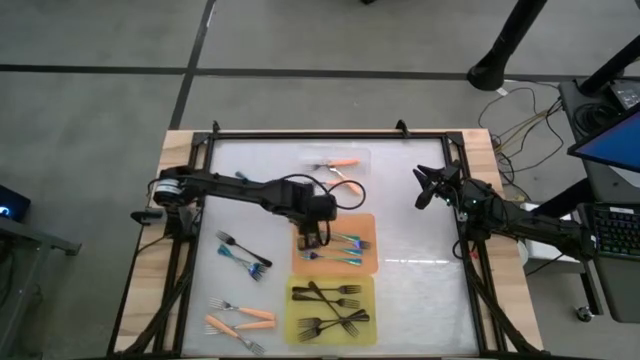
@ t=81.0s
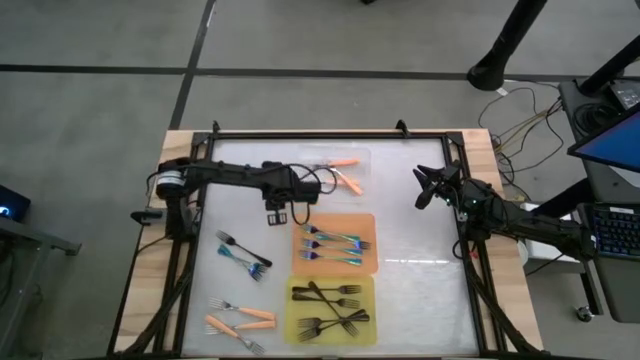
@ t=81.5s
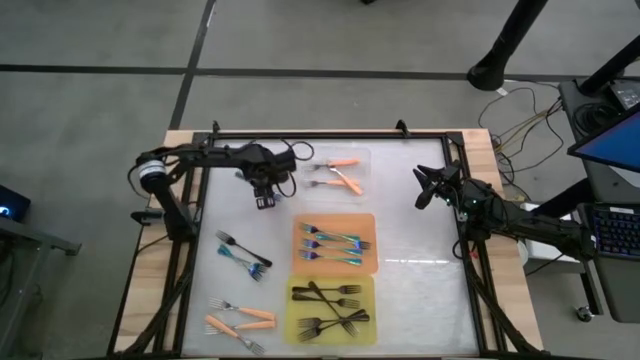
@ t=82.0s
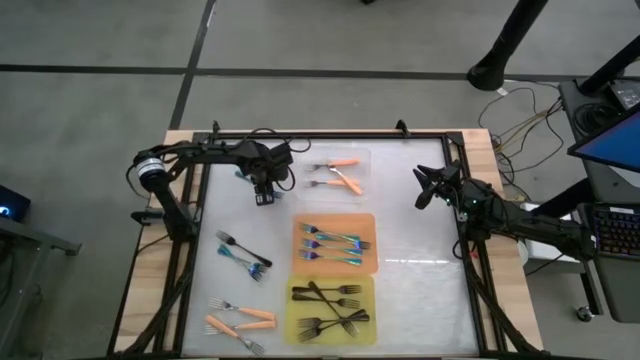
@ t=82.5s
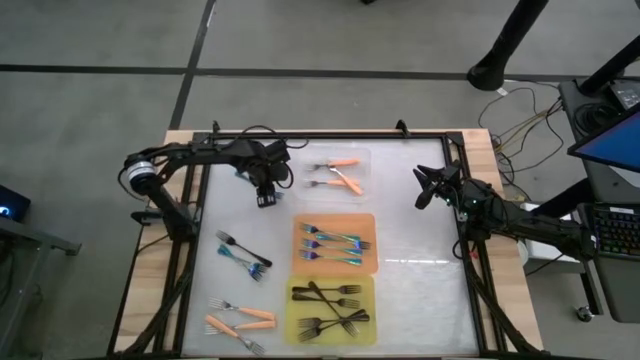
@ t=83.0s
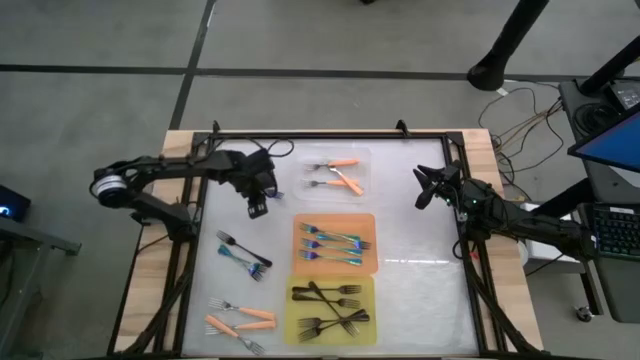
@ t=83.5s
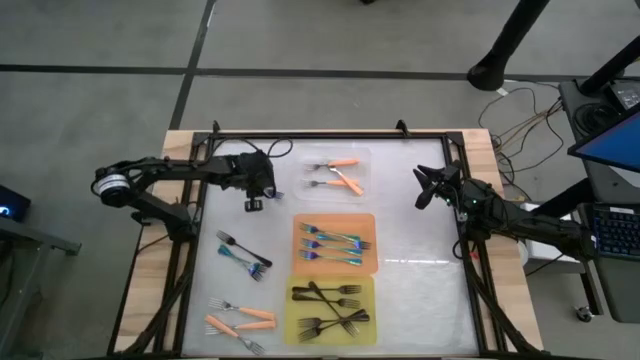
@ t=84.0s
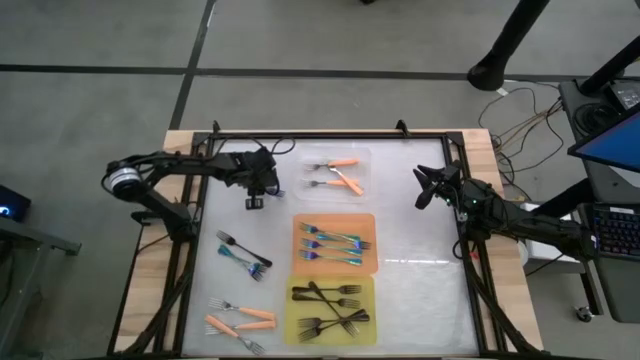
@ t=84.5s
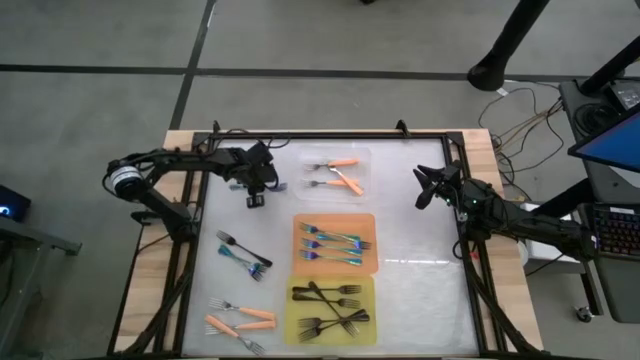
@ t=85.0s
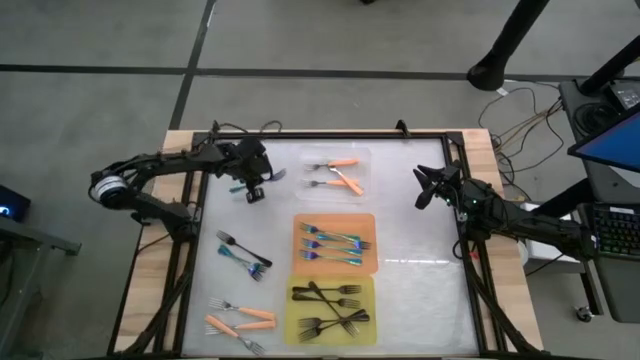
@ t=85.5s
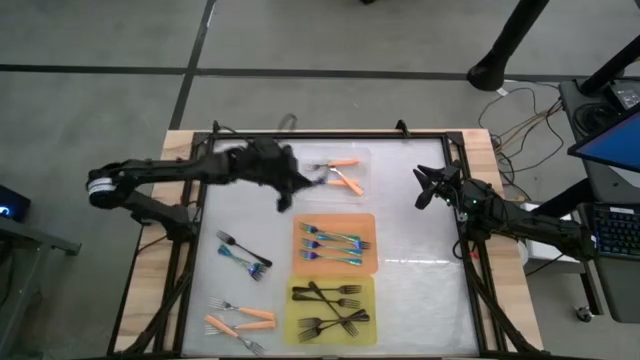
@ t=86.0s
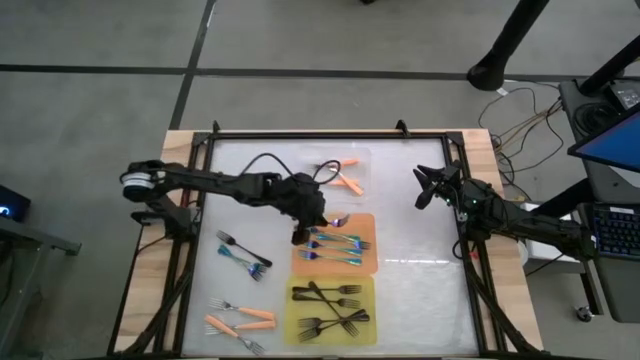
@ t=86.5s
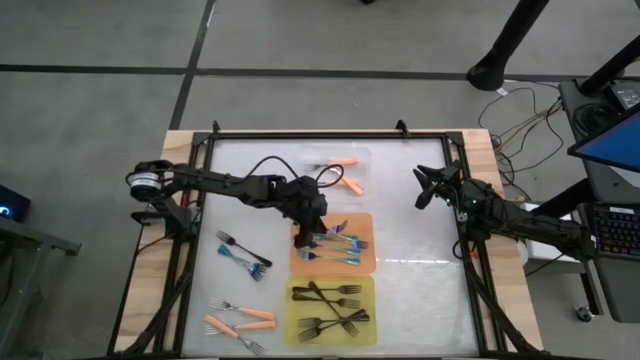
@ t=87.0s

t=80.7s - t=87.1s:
Task: Sort silverware by color (type)
Put the blue fork into the orange bin

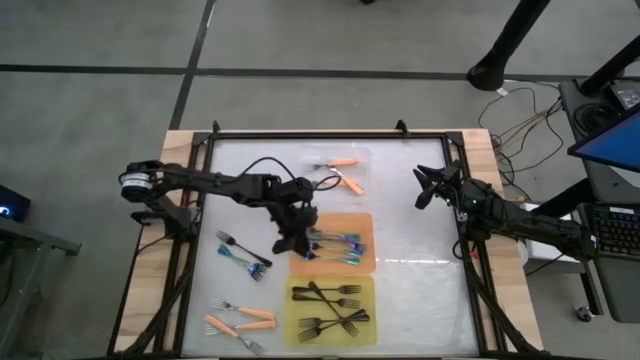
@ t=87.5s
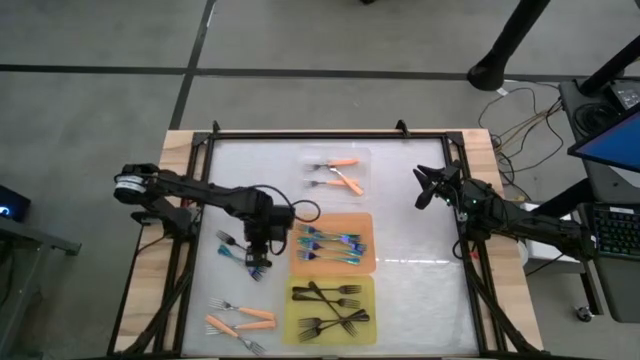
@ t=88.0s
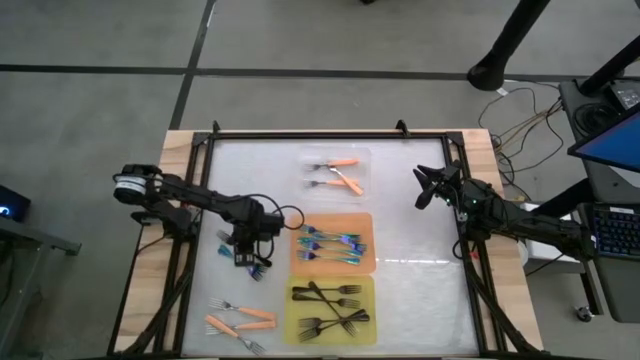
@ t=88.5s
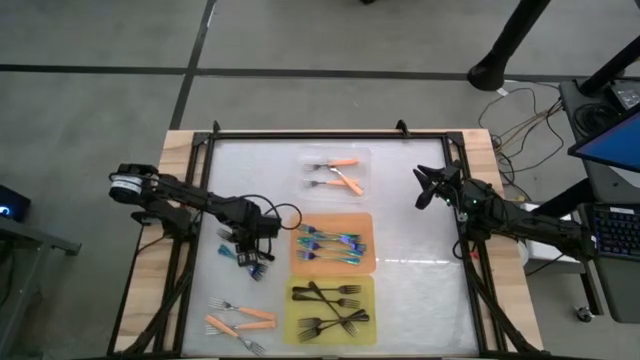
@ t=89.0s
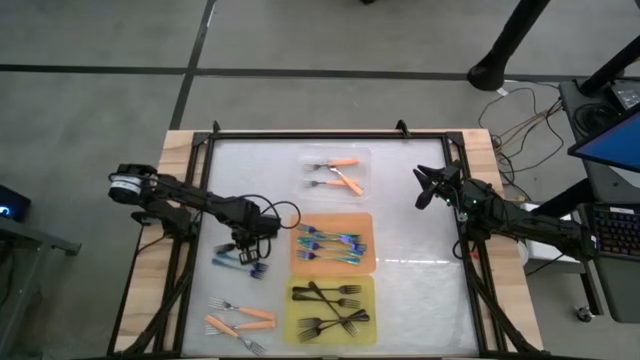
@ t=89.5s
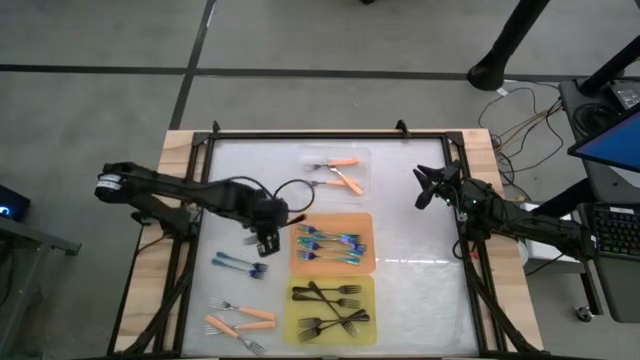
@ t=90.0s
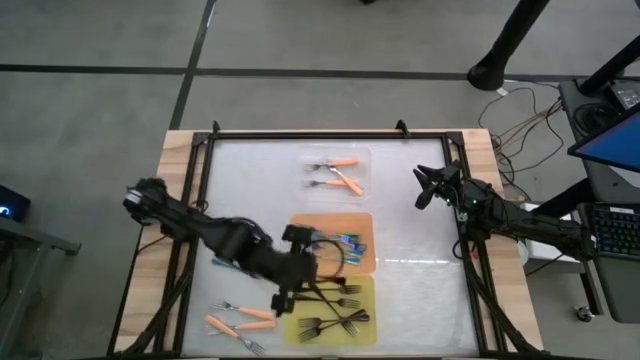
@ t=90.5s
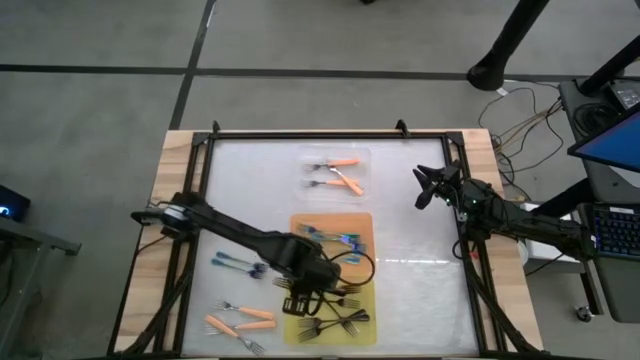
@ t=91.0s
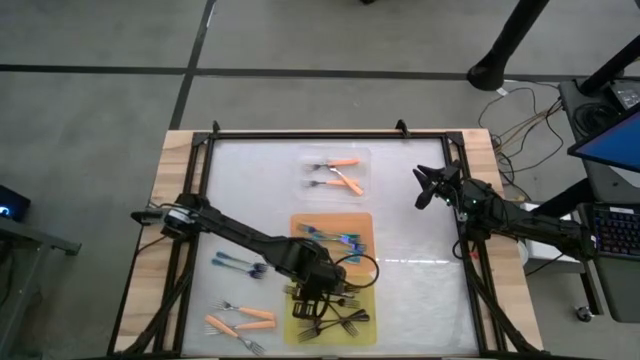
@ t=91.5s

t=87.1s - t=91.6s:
Put the black fork into the yellow bin

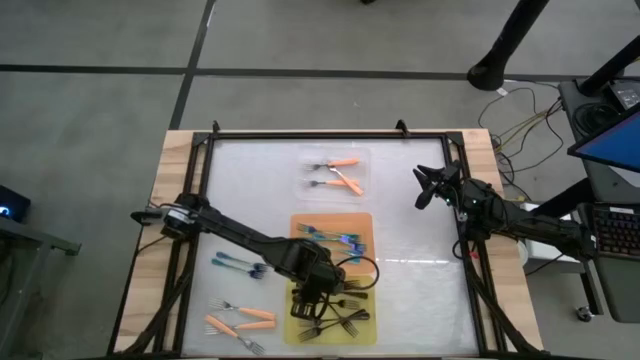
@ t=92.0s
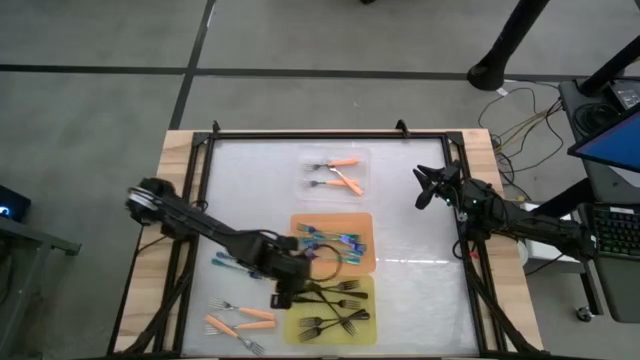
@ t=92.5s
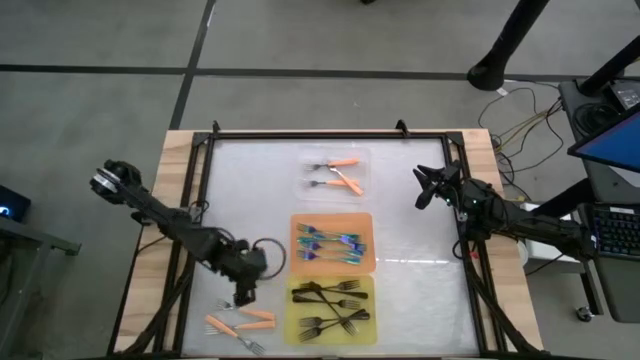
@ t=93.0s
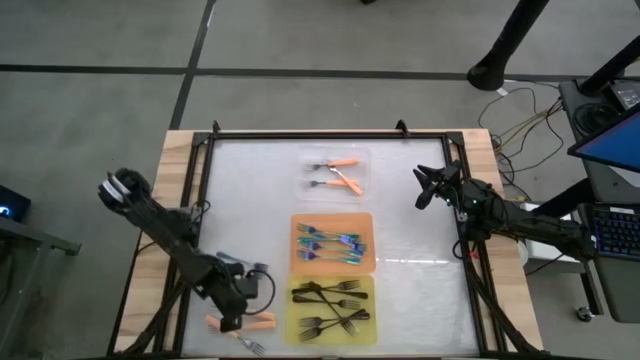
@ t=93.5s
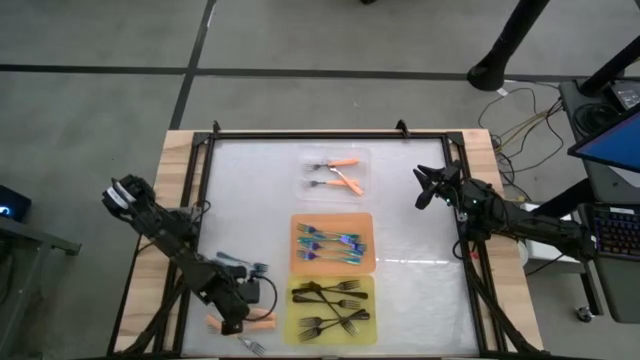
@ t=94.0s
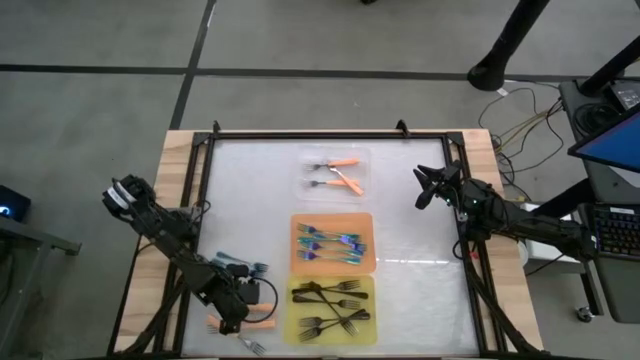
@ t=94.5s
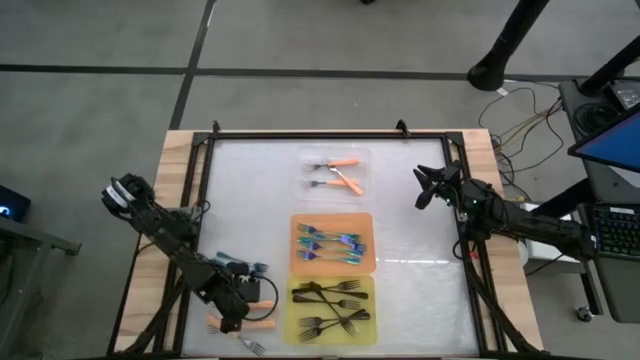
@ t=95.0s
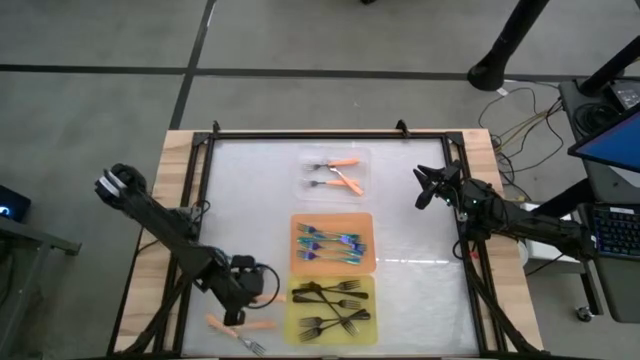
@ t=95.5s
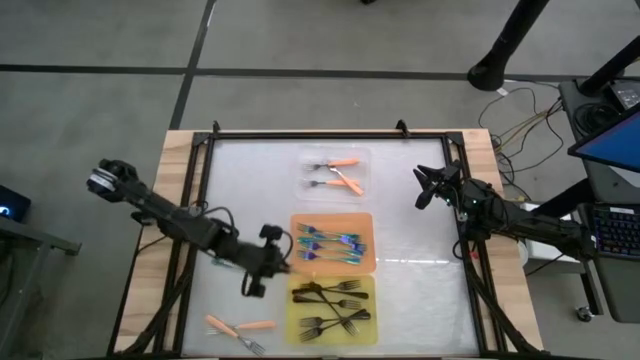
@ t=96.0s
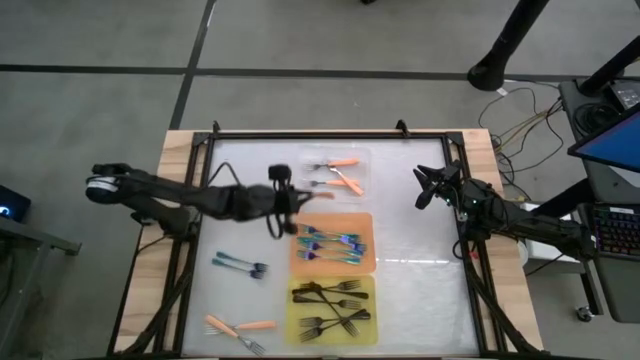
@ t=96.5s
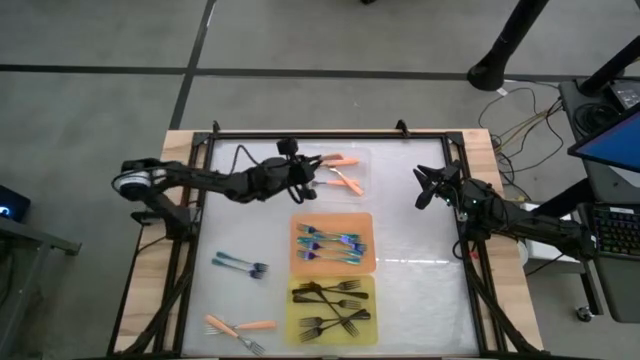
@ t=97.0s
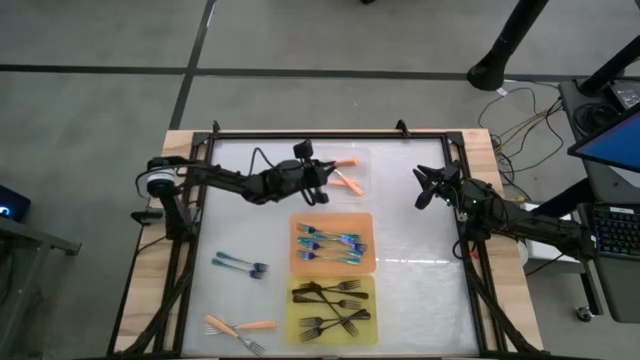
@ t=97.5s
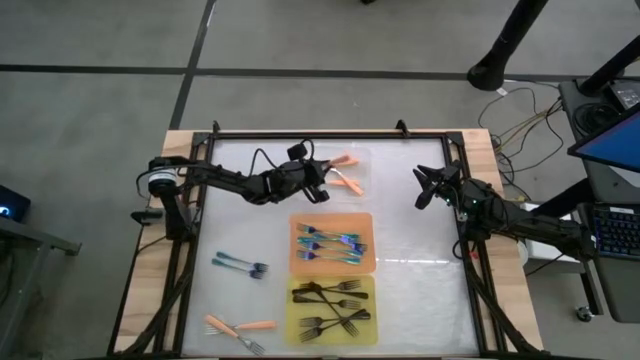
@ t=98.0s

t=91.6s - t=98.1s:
Put the orange fork into the white bin

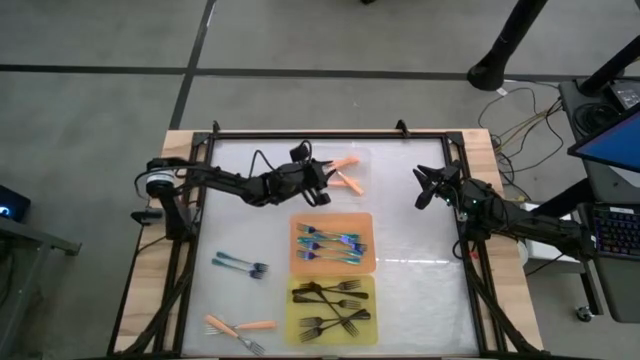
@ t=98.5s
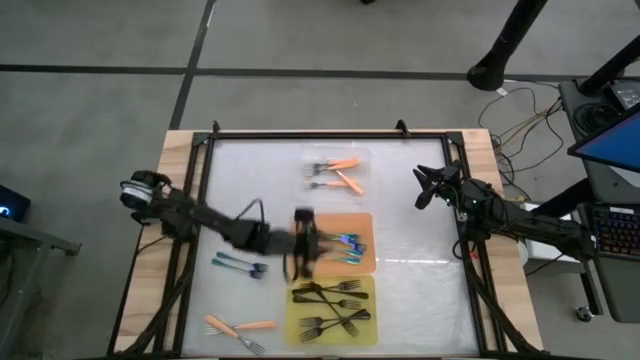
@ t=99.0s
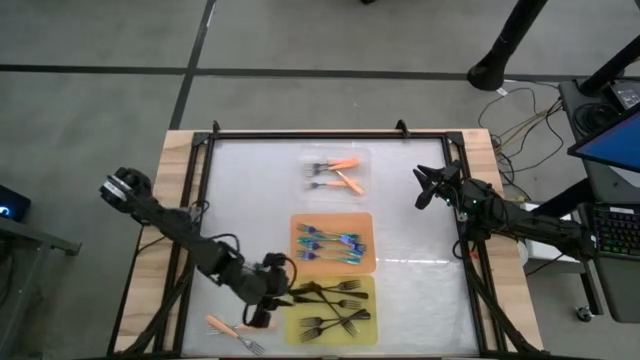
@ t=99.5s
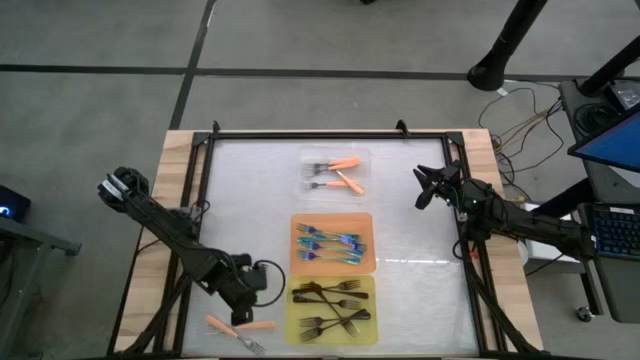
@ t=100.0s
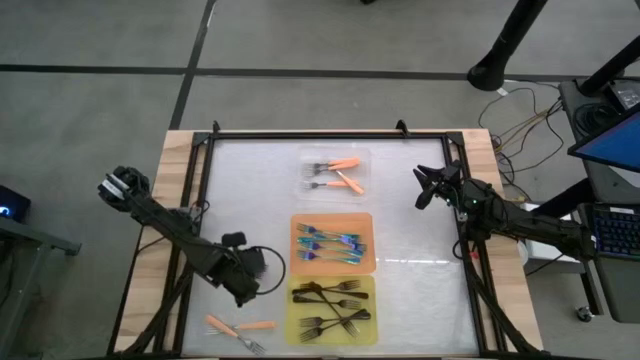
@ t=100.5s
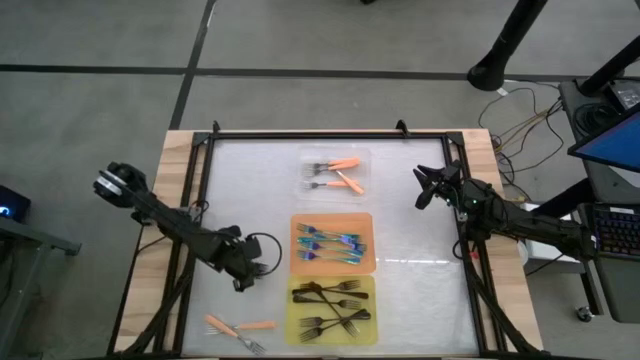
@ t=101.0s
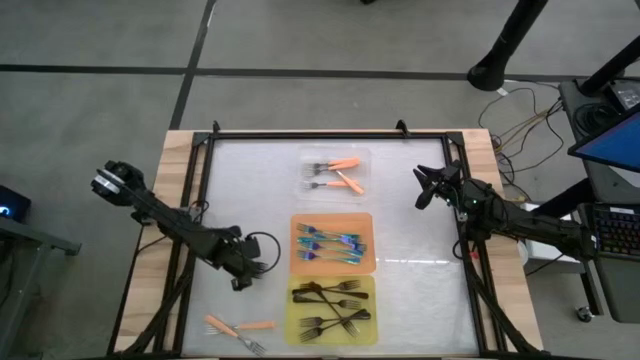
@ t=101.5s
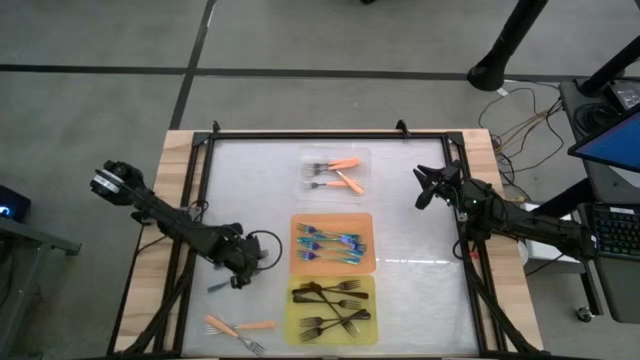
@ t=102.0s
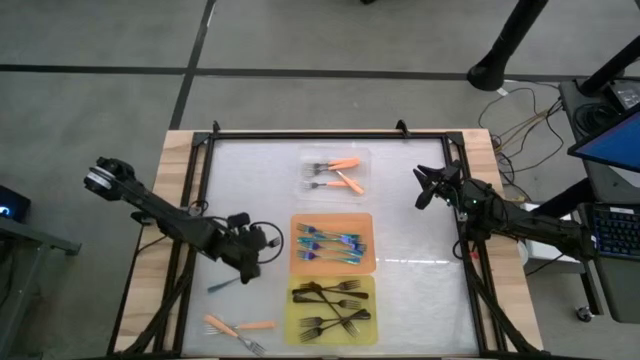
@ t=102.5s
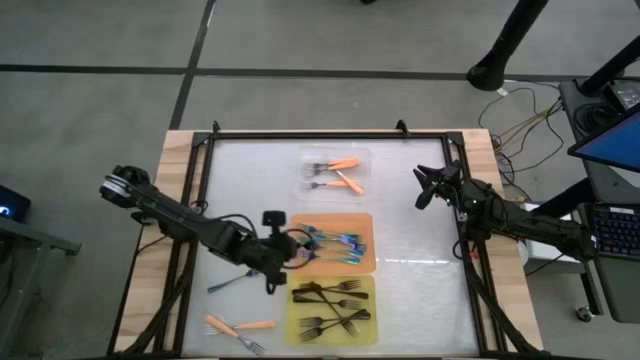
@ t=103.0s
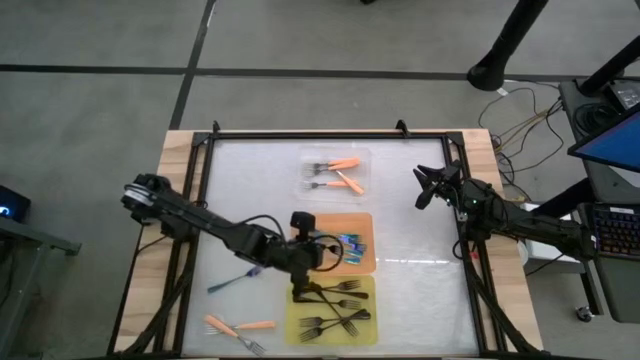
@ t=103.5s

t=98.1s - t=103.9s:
Put the blue fork into the orange bin
